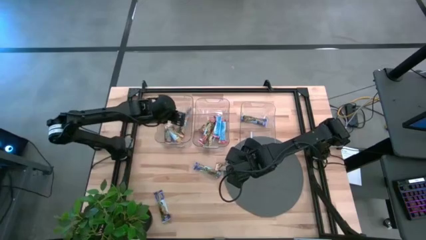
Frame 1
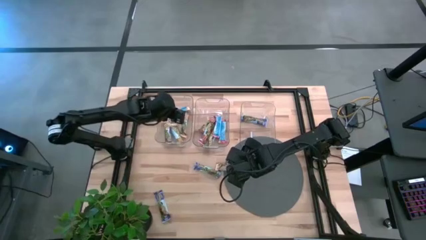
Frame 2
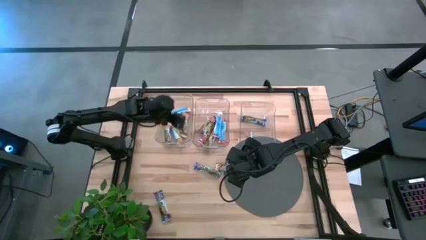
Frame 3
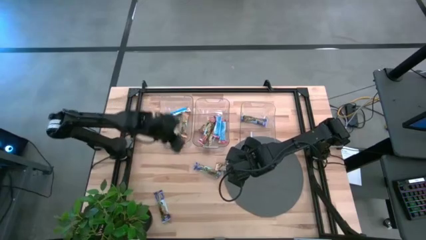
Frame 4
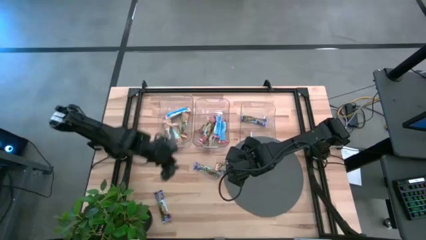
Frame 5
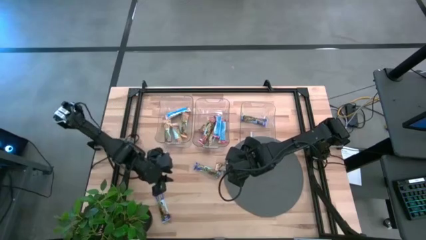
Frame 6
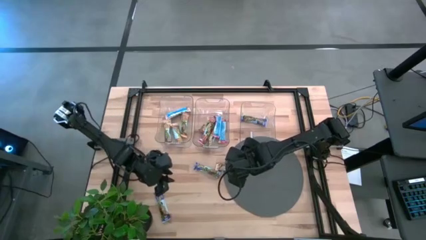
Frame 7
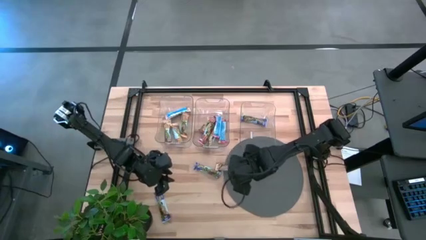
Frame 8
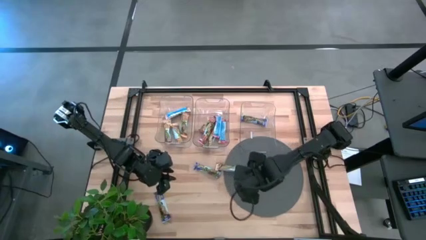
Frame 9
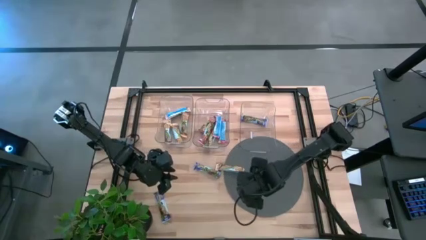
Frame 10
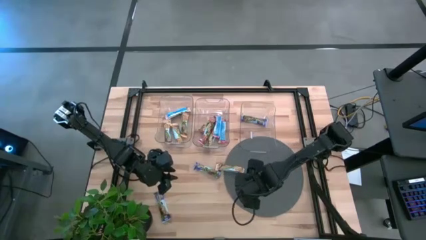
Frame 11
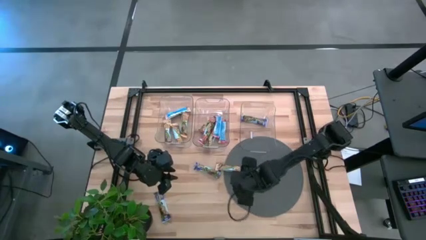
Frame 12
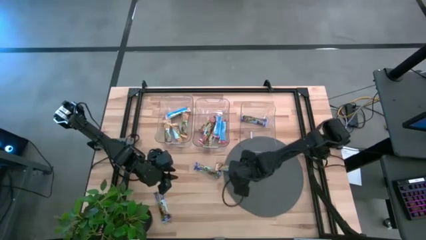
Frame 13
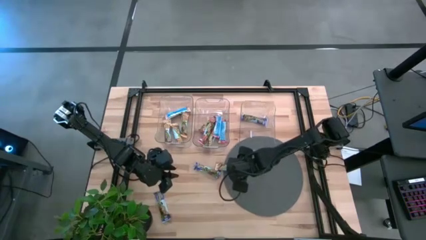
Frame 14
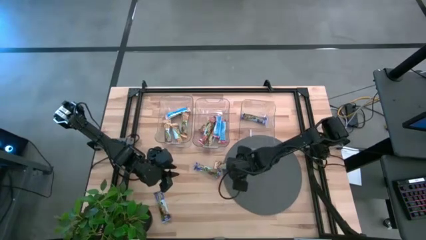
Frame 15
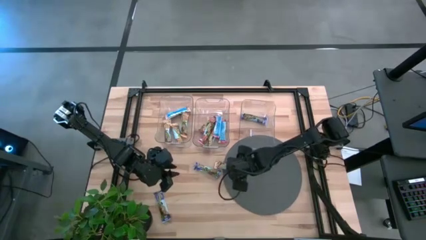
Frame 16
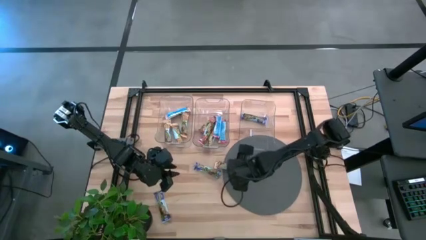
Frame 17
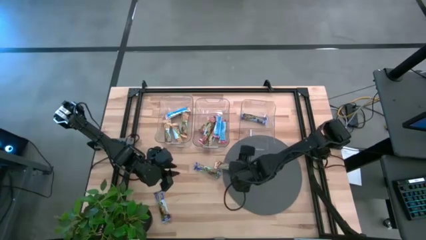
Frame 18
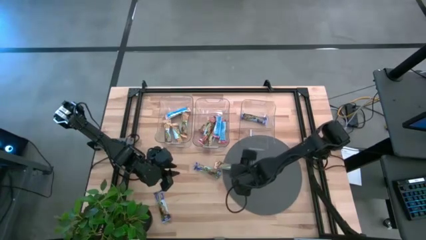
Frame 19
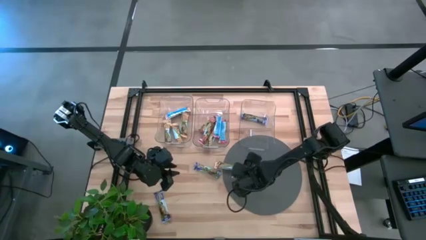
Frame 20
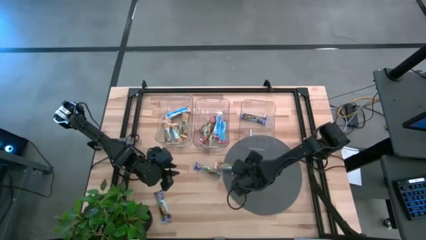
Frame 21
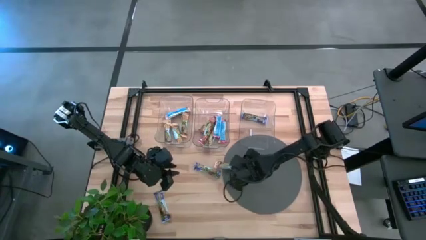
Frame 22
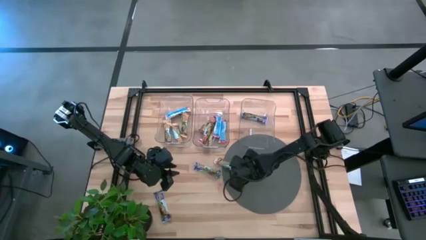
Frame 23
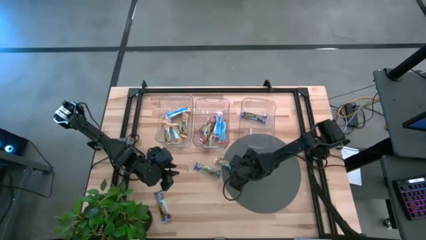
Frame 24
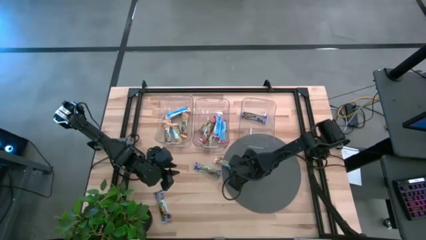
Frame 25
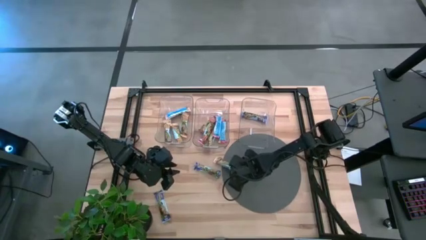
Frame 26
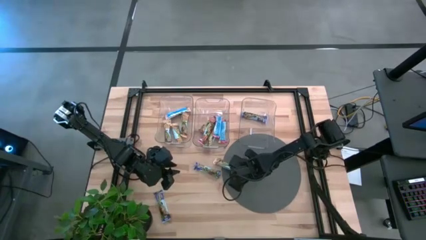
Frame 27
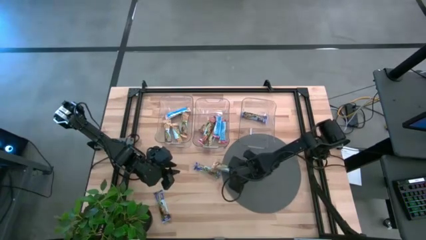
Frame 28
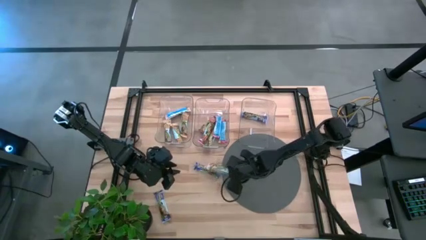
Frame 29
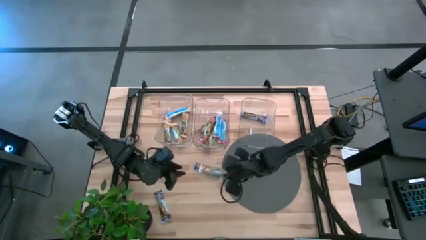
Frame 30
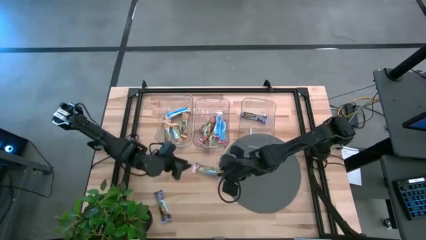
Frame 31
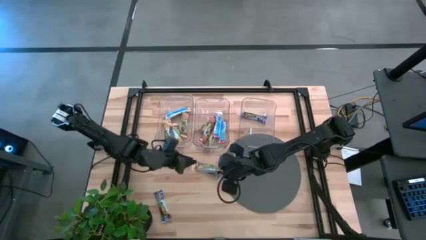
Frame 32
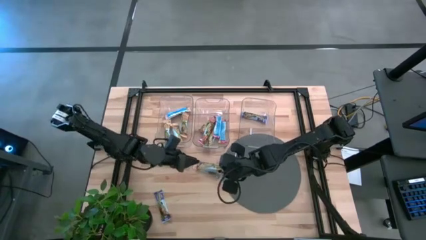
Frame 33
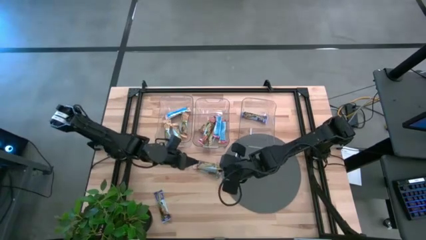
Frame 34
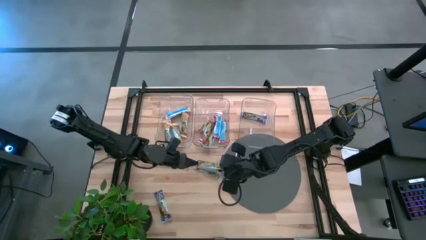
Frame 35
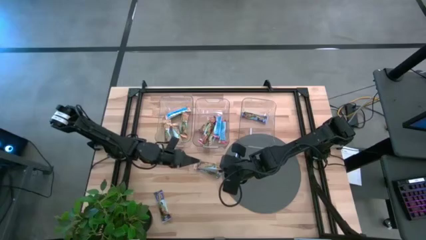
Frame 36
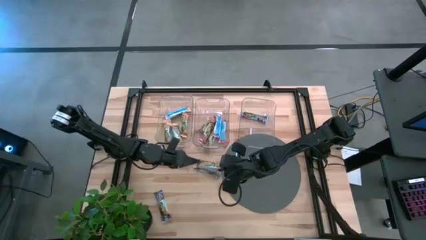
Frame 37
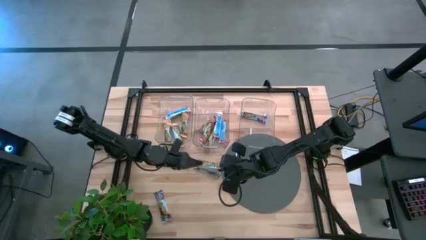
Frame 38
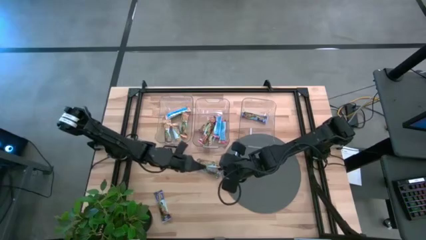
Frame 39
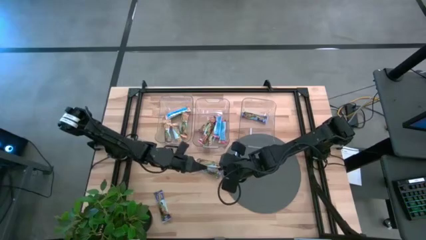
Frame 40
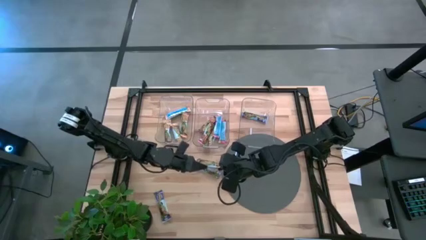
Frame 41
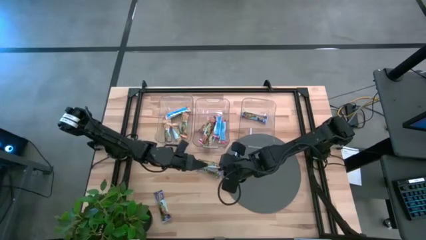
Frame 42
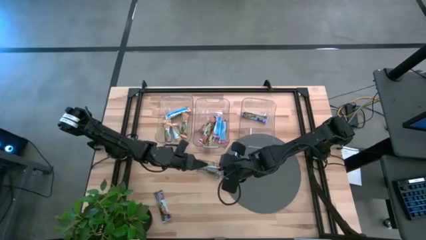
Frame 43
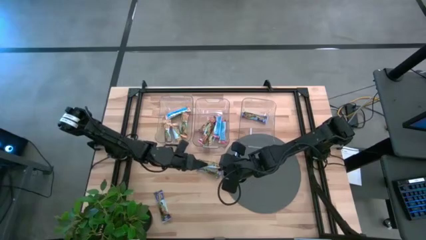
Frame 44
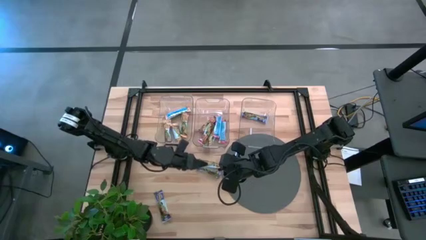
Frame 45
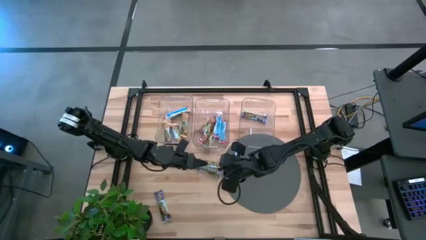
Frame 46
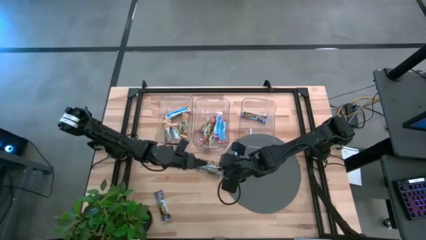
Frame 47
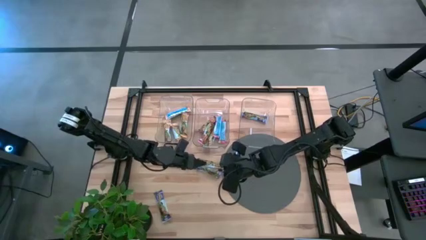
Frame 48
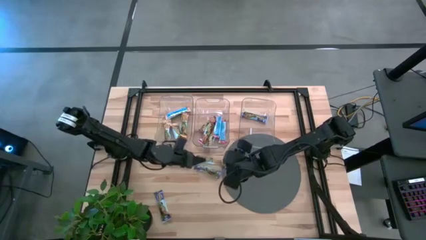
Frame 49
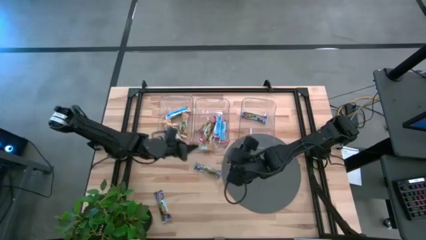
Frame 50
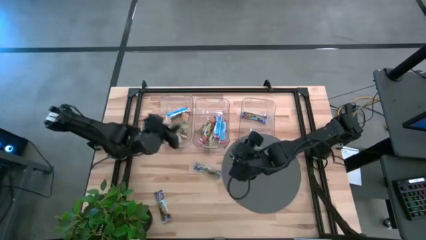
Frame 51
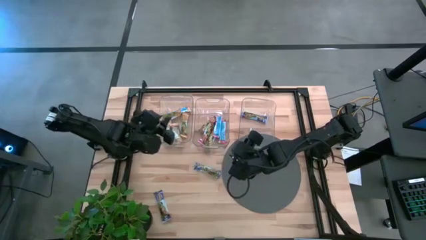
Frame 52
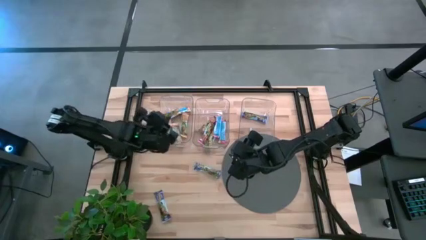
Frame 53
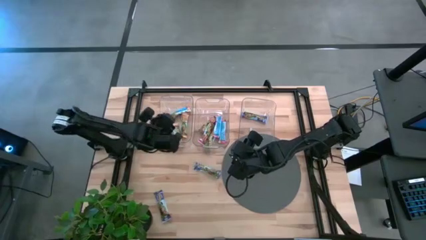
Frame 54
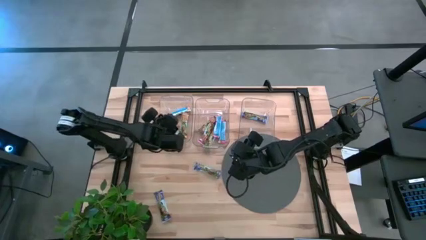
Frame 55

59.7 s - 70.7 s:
Task: Pick and place Granola Bars by type
Put the yellow granola bar into the left transparent bin

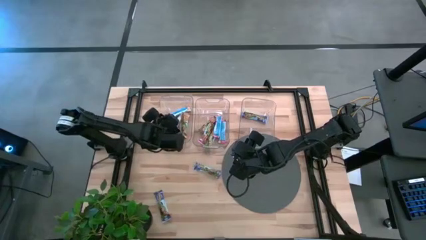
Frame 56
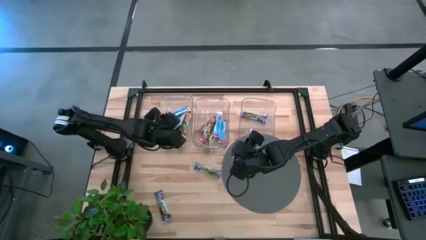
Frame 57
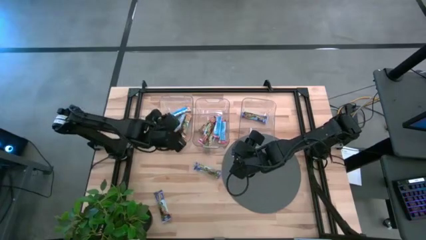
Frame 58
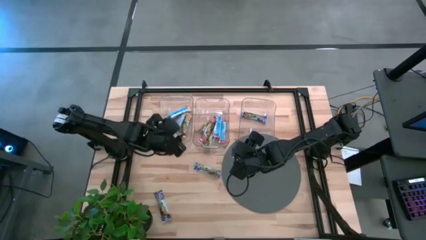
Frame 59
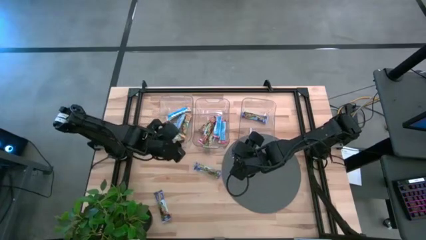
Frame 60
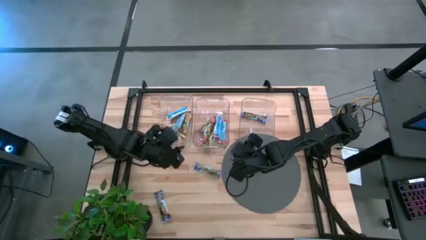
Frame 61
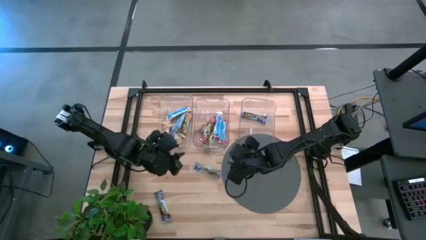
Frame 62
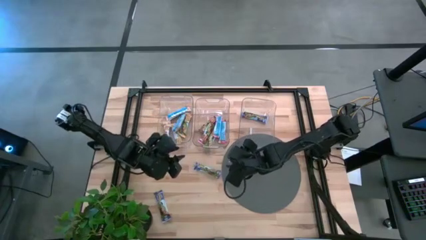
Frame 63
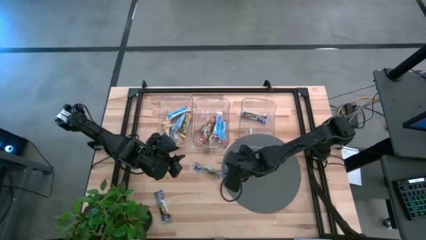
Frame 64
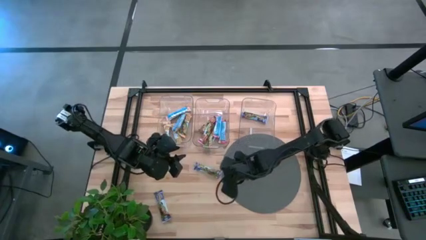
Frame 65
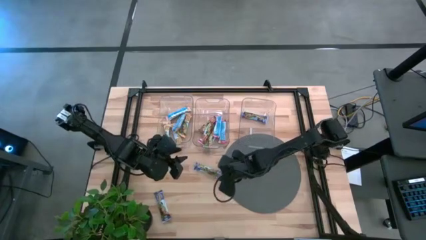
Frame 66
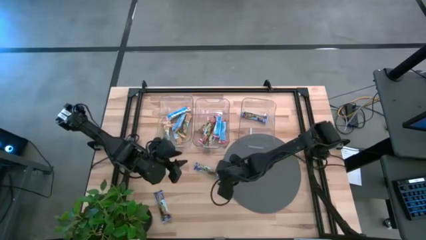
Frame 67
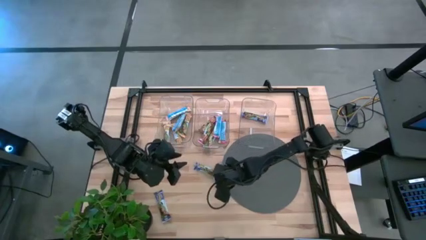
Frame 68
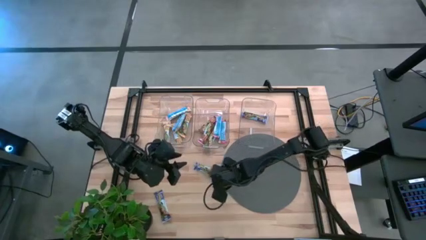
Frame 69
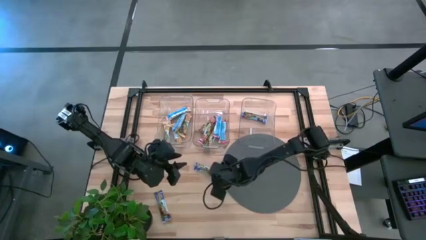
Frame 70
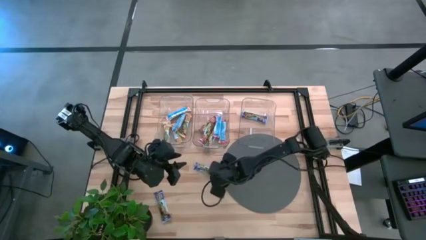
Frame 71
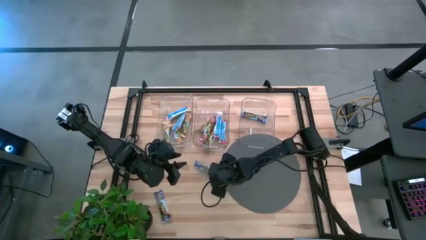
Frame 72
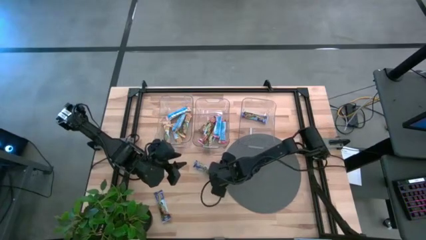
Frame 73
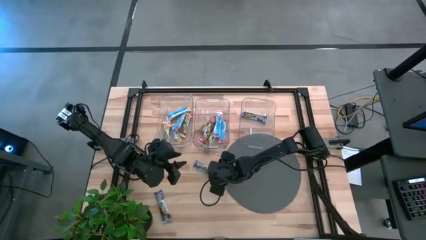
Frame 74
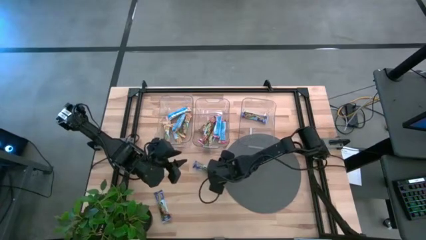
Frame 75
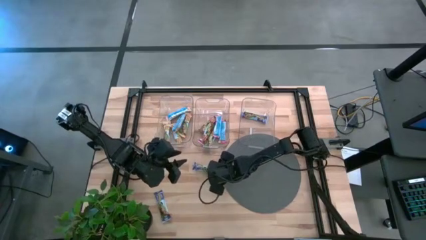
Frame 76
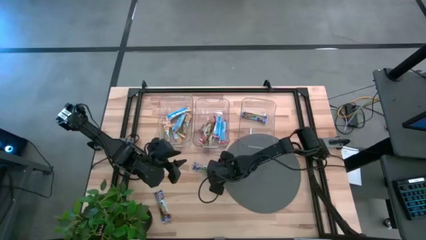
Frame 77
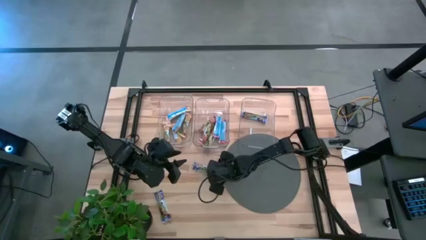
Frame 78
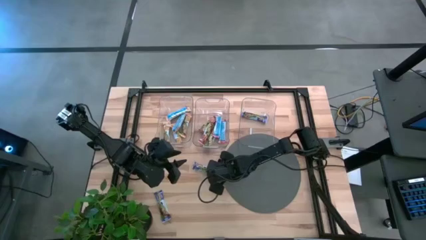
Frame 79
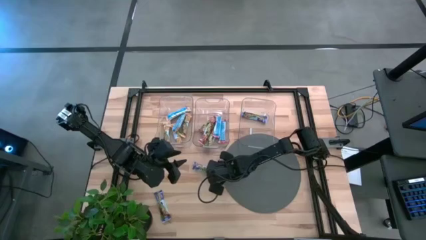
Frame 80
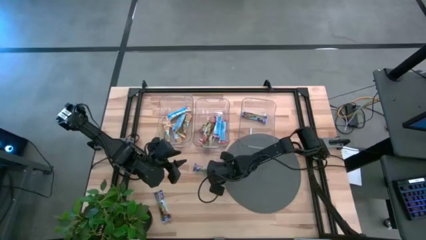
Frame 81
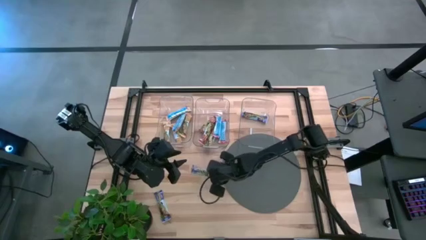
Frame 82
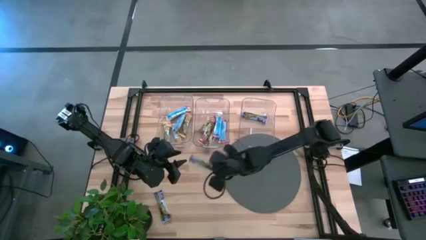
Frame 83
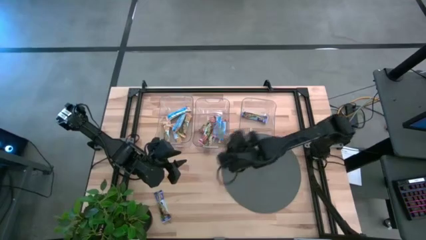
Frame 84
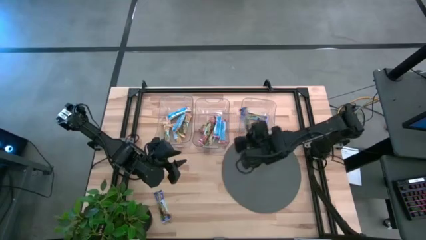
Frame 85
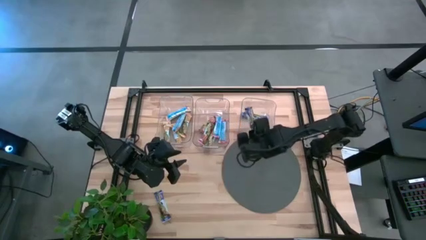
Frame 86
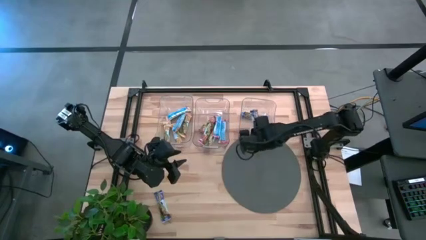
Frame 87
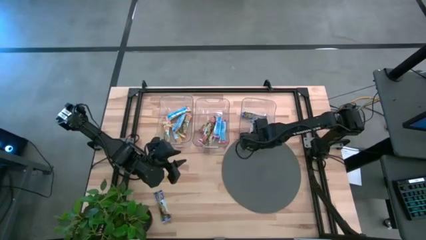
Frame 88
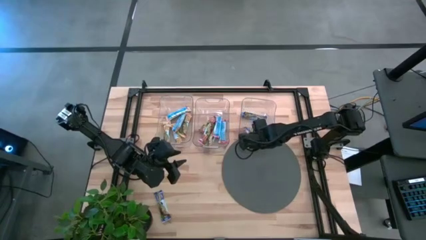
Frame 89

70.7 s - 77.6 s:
Put the blue granola bar into the right transparent bin
